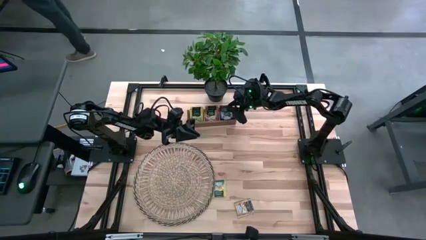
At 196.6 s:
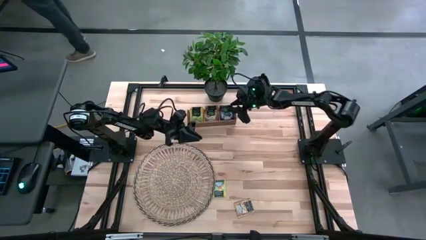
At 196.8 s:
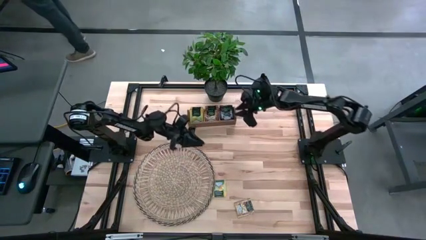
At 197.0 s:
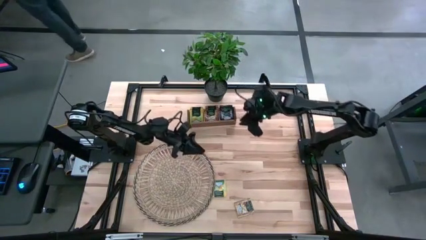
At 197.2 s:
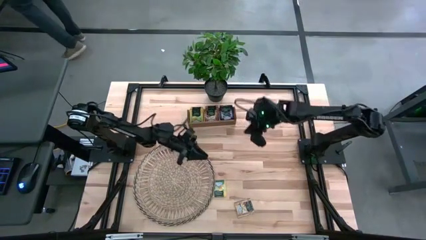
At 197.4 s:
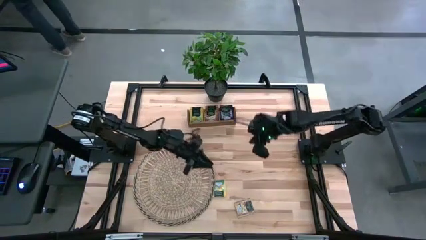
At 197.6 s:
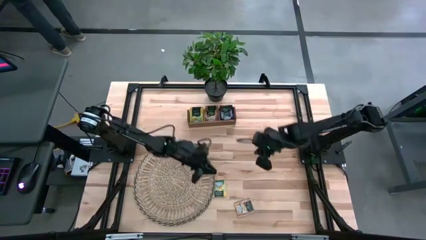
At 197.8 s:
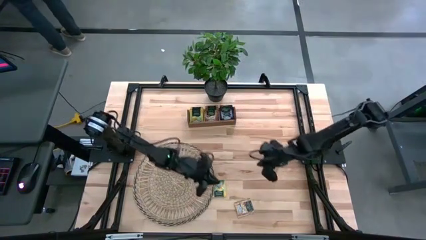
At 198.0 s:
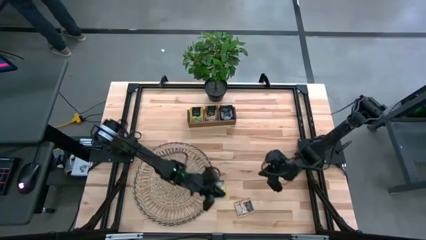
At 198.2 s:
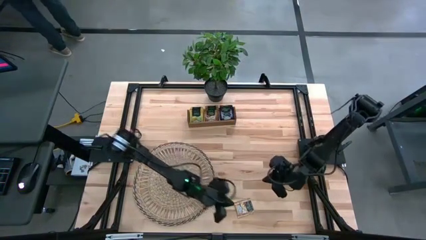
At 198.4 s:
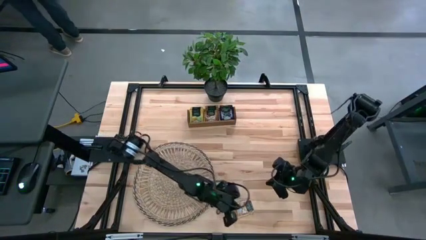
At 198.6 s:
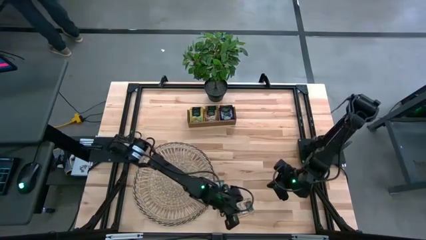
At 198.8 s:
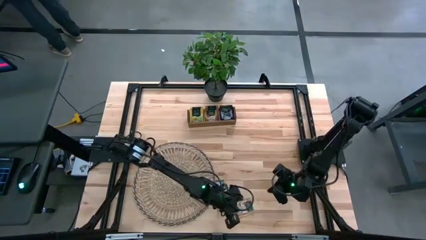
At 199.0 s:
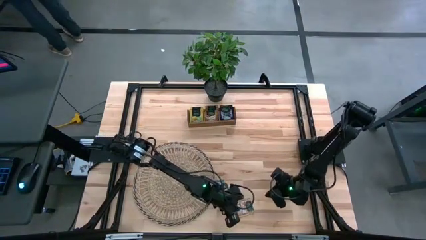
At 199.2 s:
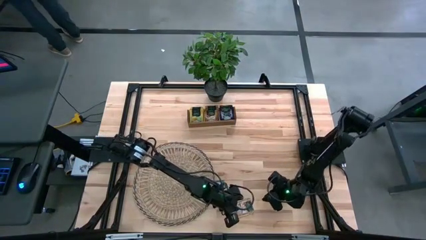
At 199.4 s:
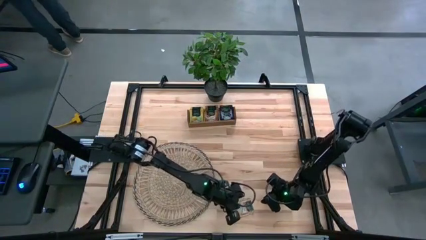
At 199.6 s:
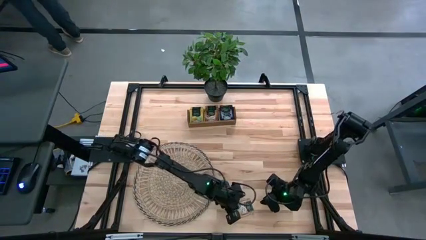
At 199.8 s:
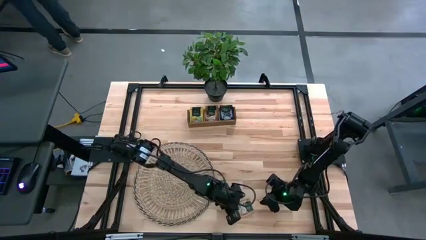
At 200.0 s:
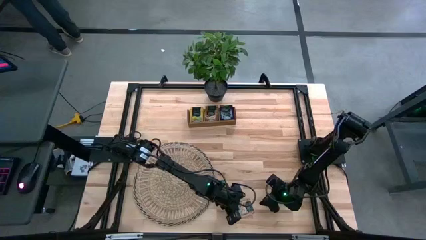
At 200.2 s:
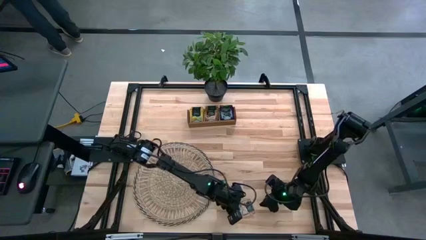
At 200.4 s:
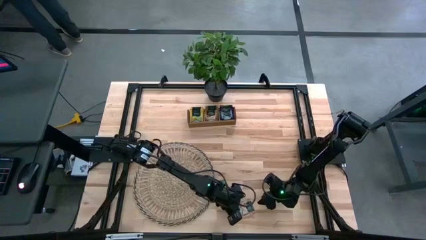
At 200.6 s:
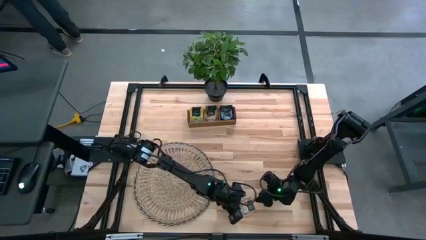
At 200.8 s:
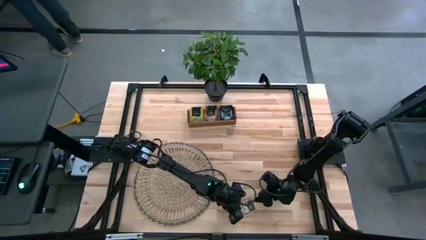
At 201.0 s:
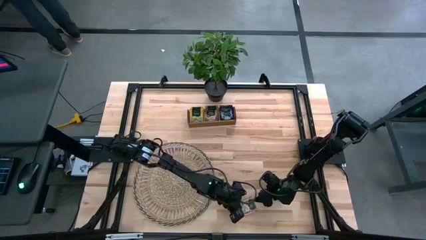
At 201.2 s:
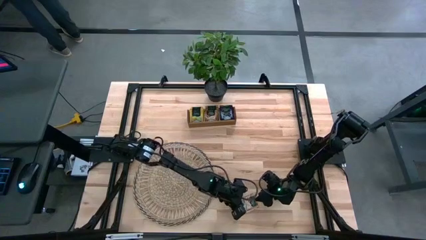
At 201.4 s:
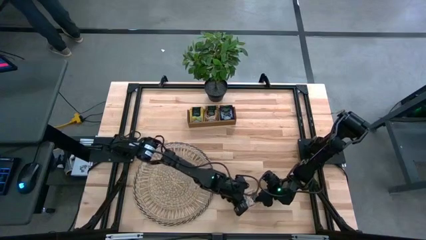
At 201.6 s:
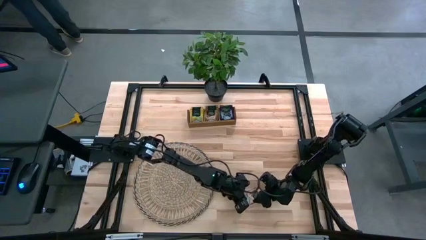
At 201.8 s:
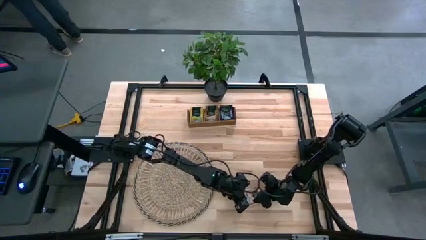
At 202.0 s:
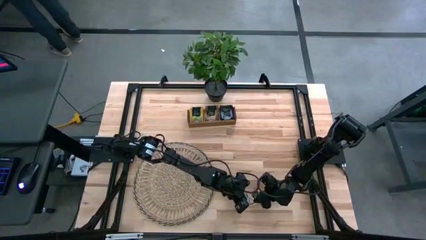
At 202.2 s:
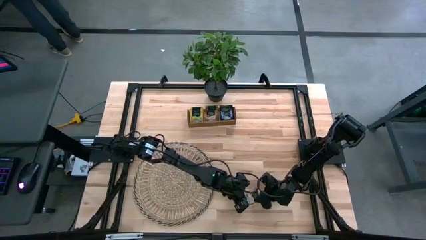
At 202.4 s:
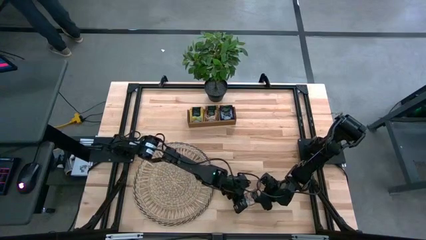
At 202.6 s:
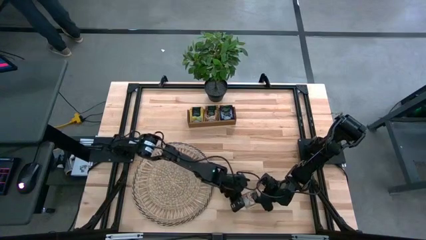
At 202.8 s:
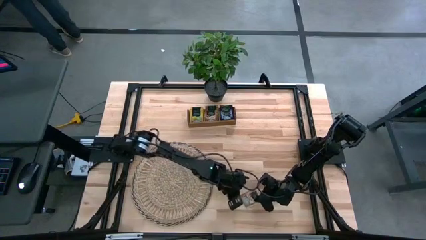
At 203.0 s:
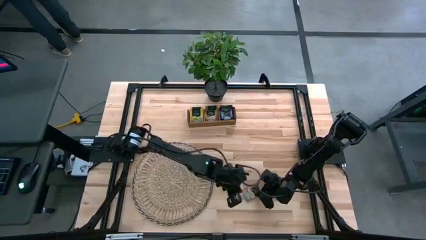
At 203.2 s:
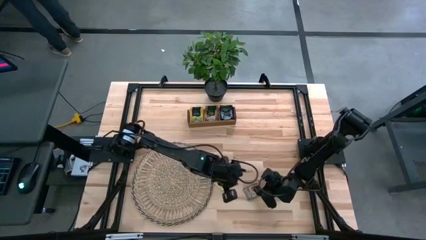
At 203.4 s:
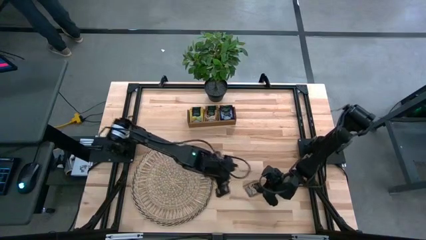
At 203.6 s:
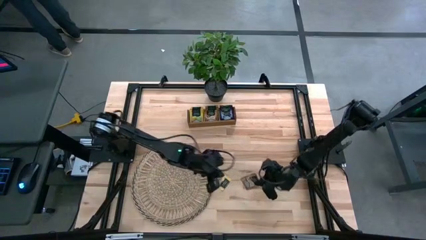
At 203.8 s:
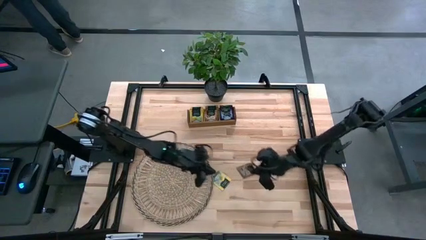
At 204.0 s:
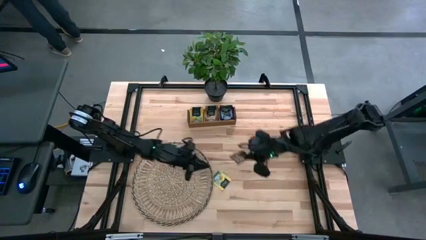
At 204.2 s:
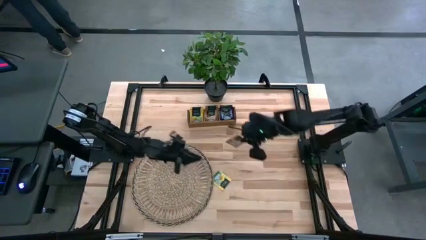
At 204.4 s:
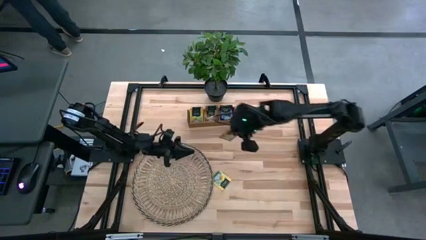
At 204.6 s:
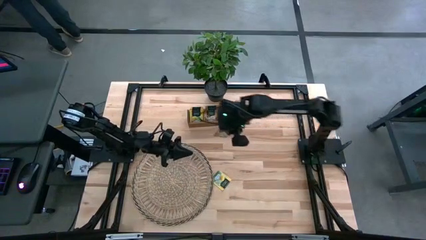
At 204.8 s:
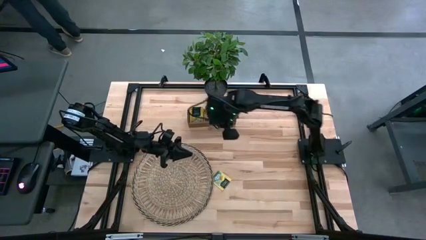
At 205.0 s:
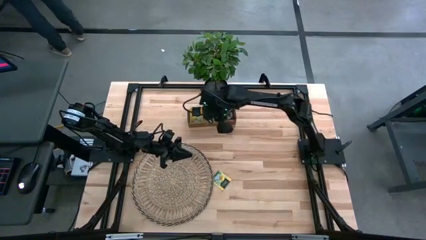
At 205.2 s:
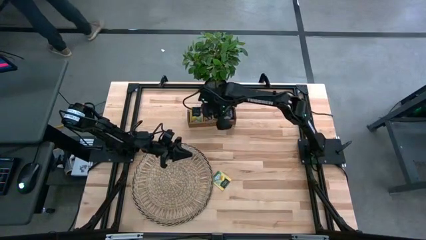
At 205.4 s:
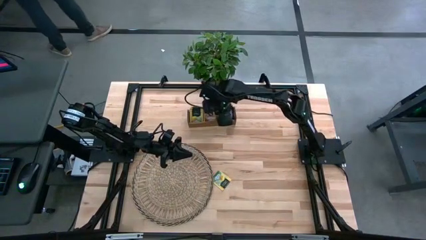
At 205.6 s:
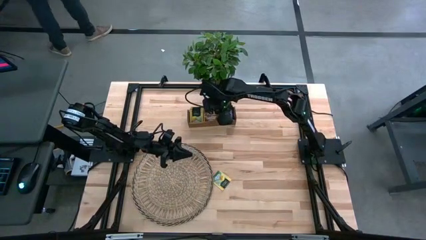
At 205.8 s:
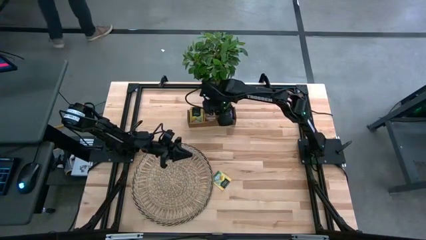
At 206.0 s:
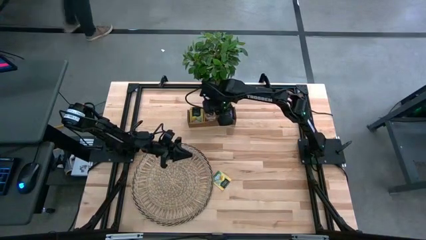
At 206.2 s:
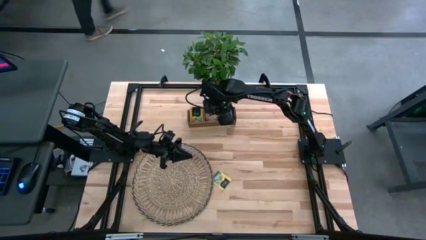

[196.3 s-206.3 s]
Task: Pick & Place Tea
Put the brown tea bag into the middle section of the wooden organizer

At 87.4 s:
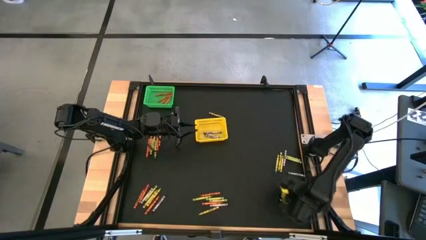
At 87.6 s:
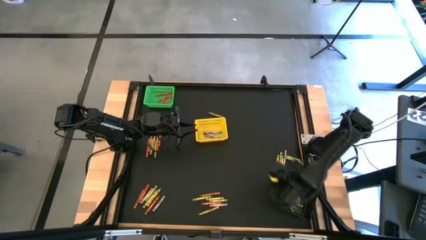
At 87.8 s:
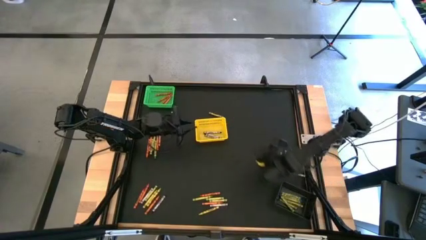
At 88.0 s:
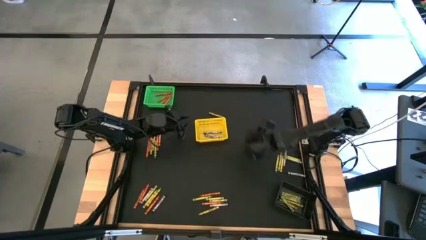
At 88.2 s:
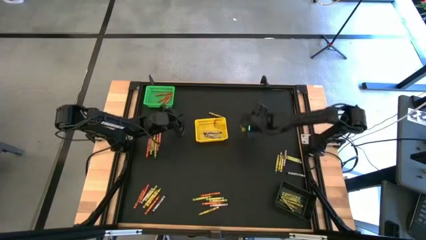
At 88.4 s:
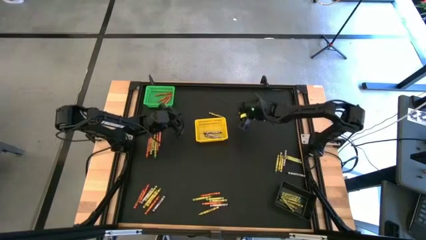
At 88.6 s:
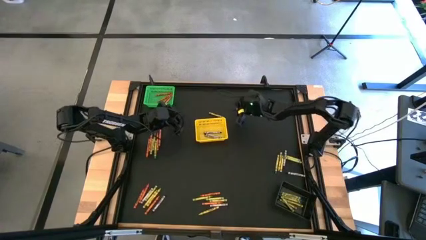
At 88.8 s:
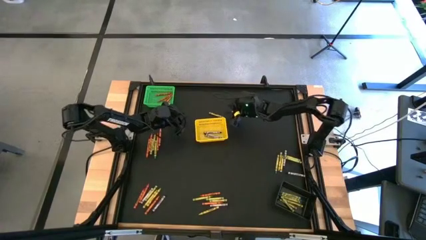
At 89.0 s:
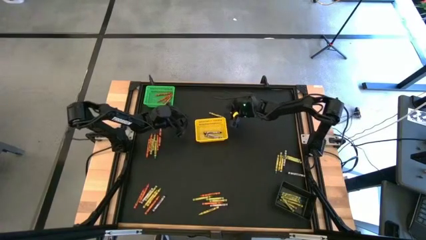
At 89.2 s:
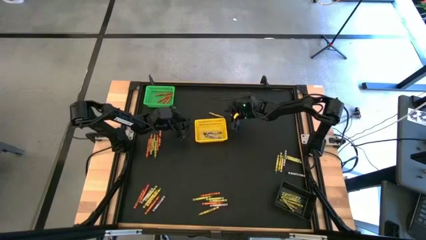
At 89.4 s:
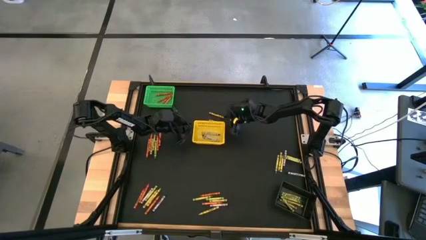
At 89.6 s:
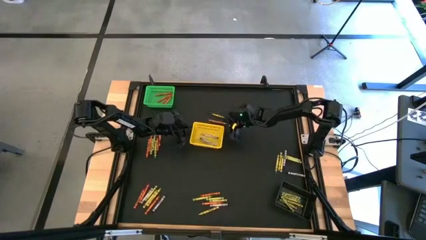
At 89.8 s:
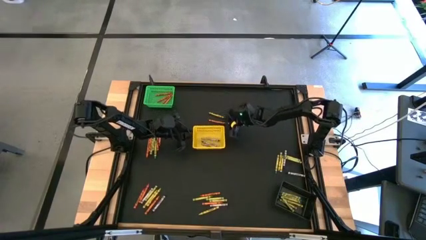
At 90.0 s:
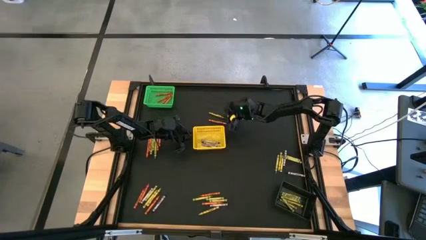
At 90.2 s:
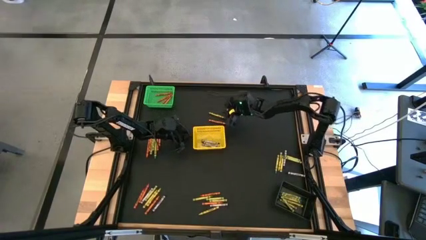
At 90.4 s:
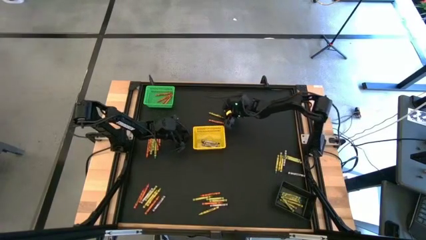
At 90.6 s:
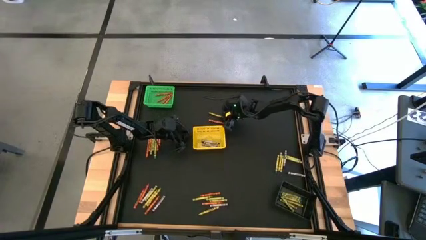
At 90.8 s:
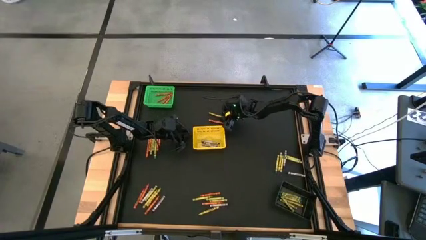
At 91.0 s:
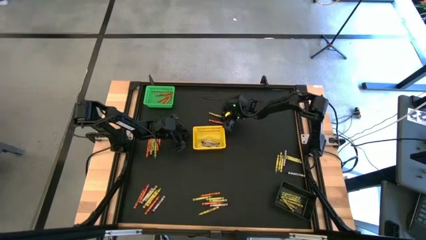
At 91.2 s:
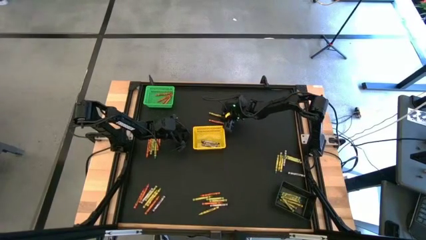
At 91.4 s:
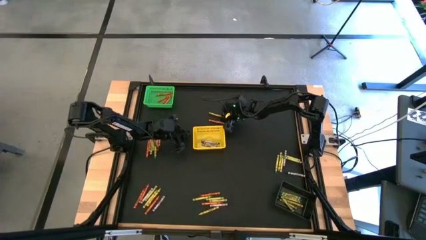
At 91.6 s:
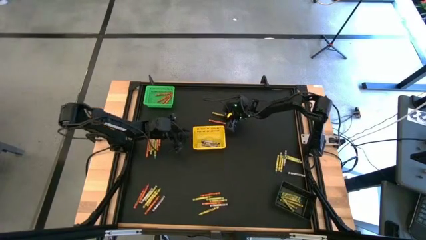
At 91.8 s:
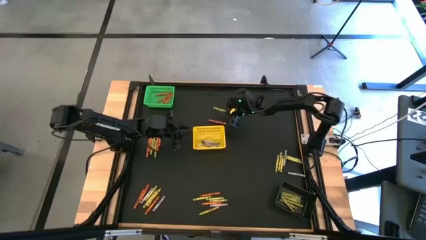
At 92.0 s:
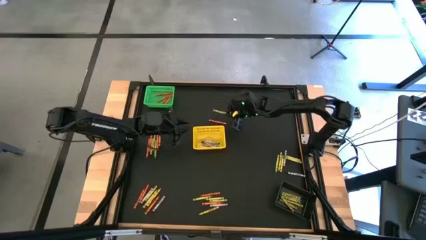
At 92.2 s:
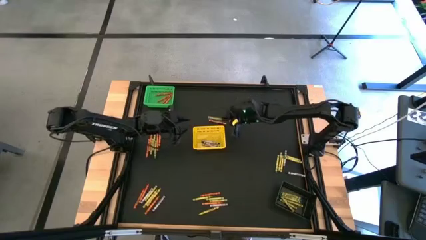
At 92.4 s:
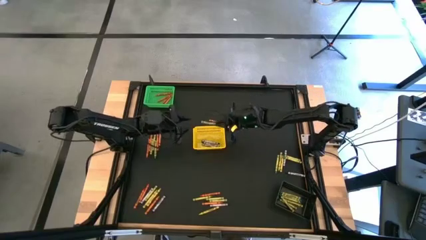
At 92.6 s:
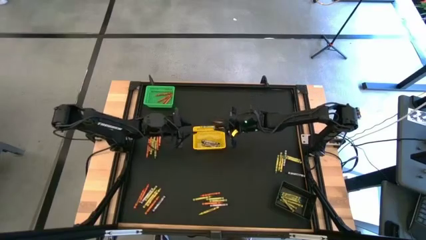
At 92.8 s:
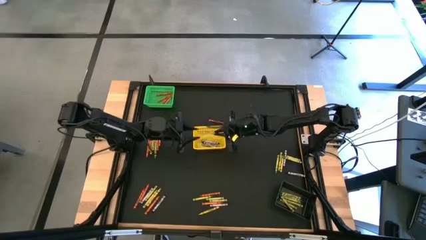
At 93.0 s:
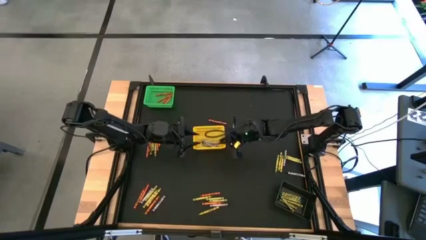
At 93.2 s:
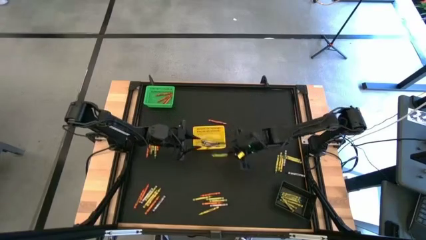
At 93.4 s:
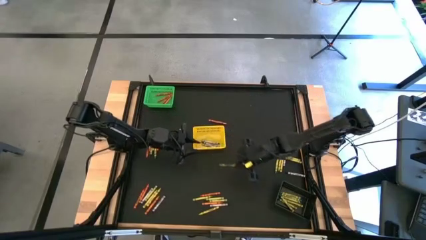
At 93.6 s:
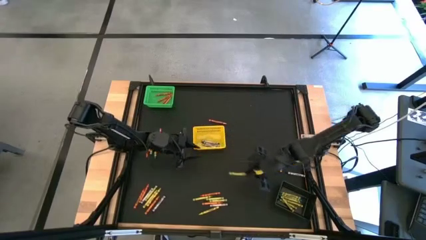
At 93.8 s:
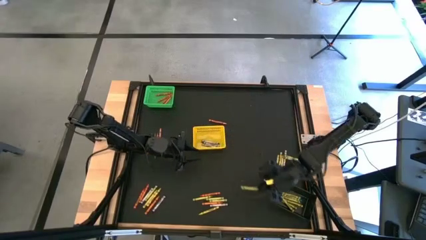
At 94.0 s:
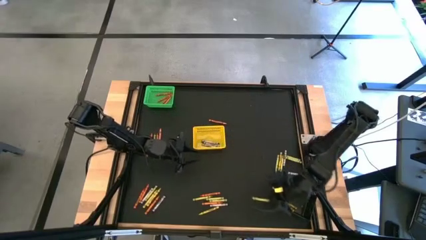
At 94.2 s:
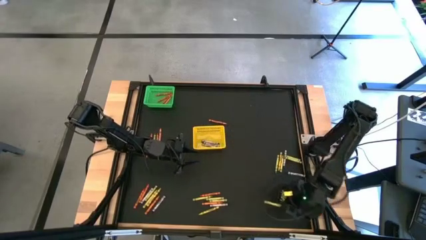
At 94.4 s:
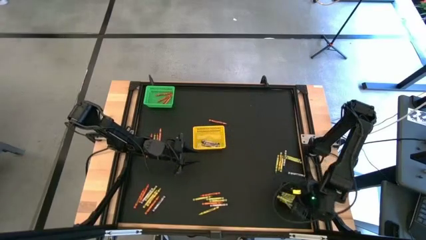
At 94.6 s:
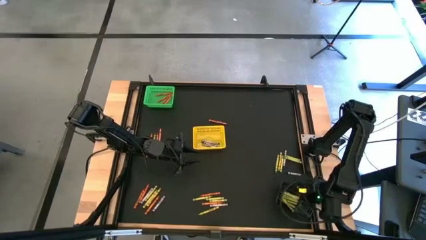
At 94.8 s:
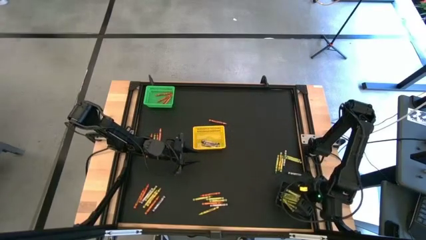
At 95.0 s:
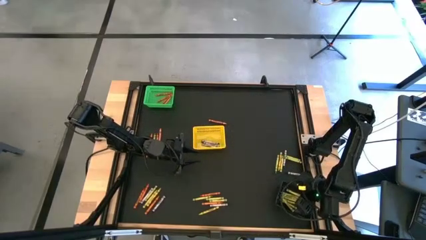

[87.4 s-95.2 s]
Task: Sort crayons
Put the green crayon into the black bin
